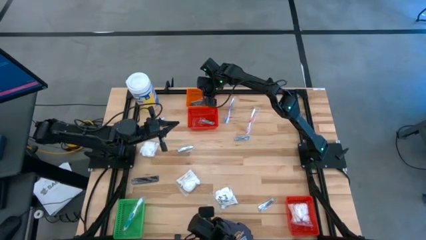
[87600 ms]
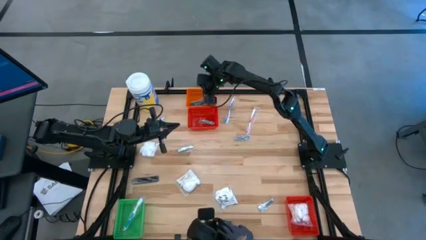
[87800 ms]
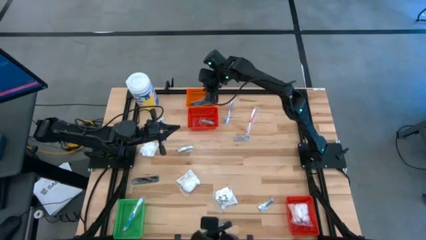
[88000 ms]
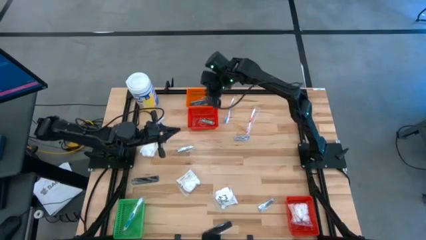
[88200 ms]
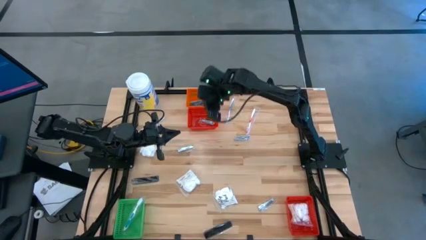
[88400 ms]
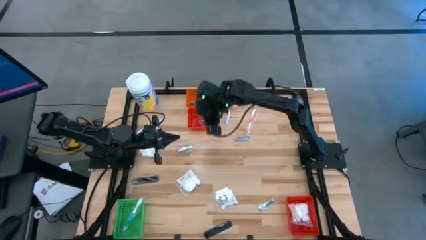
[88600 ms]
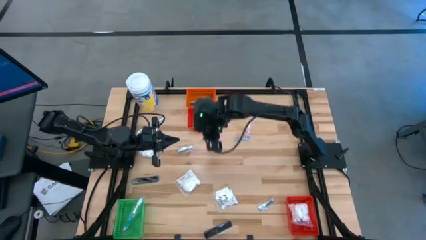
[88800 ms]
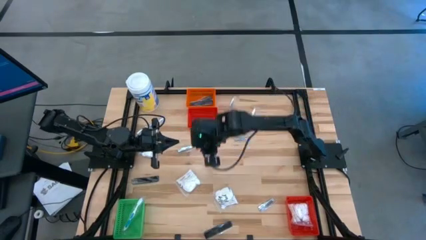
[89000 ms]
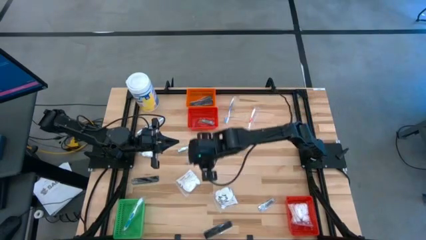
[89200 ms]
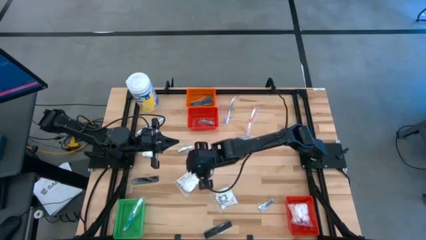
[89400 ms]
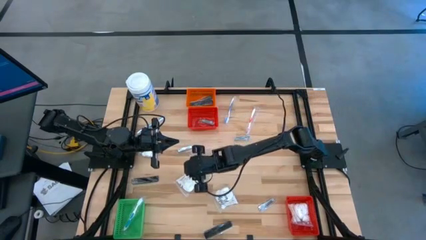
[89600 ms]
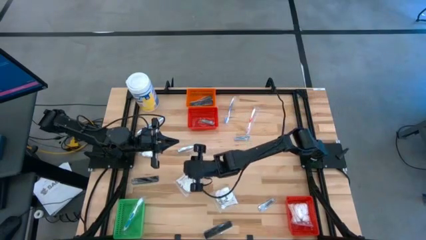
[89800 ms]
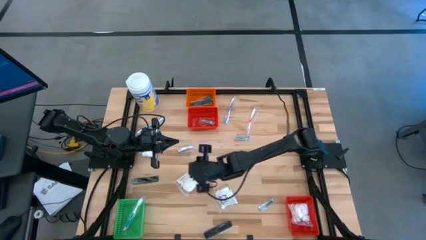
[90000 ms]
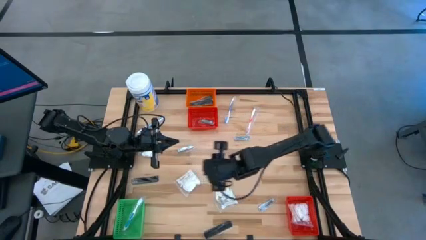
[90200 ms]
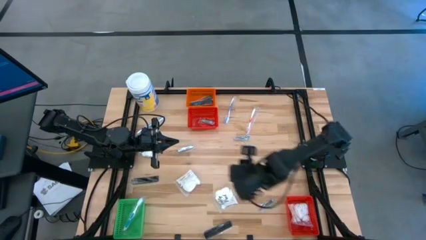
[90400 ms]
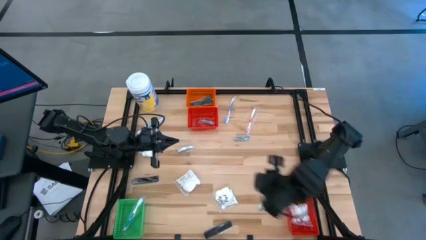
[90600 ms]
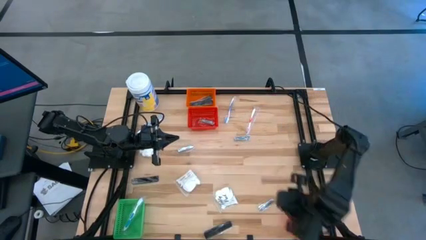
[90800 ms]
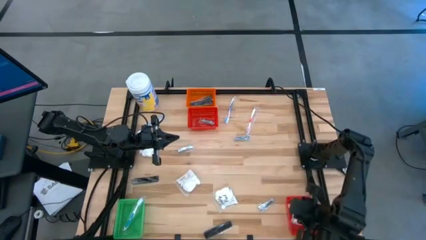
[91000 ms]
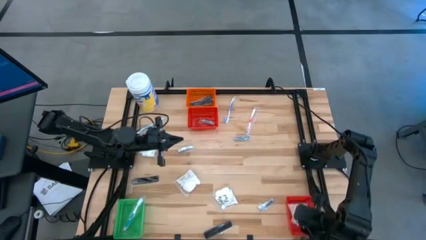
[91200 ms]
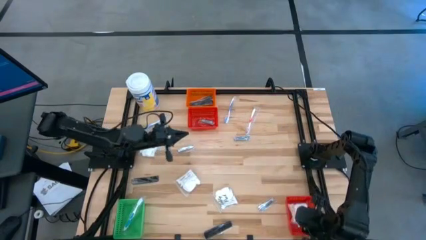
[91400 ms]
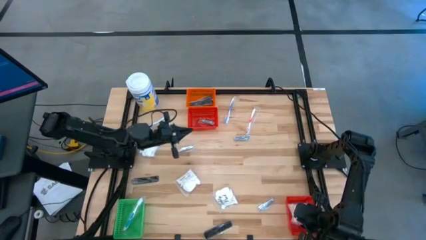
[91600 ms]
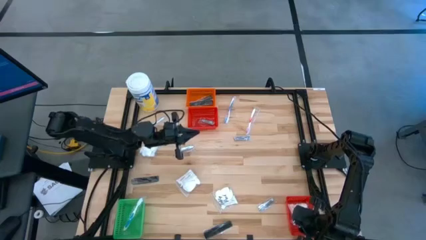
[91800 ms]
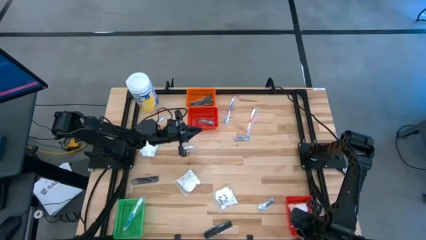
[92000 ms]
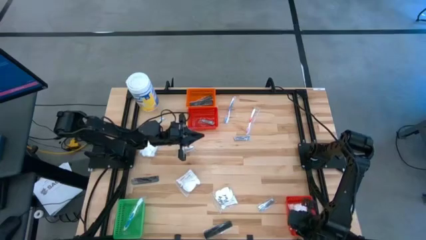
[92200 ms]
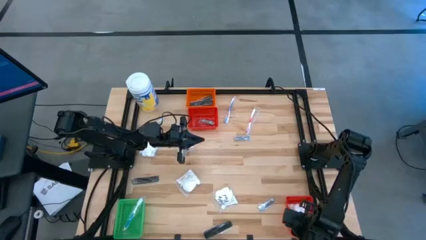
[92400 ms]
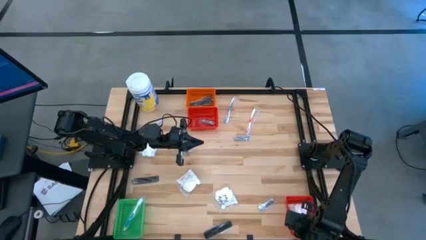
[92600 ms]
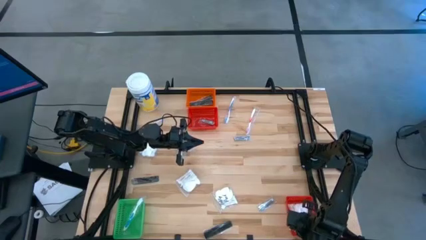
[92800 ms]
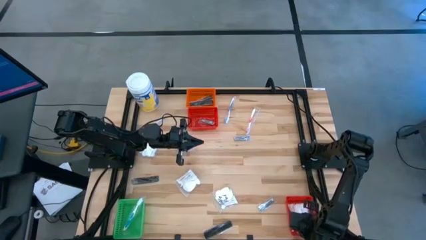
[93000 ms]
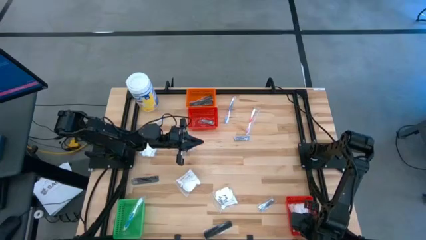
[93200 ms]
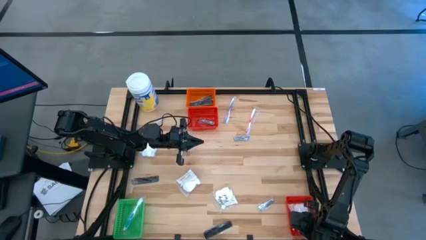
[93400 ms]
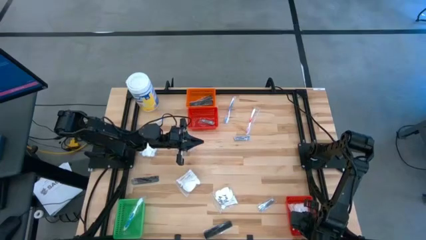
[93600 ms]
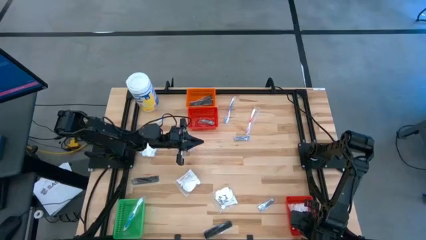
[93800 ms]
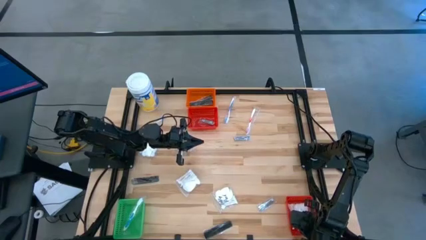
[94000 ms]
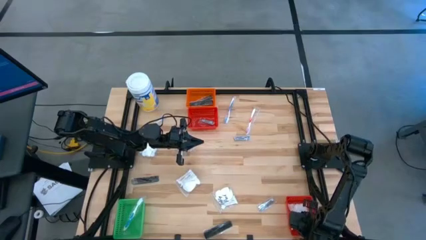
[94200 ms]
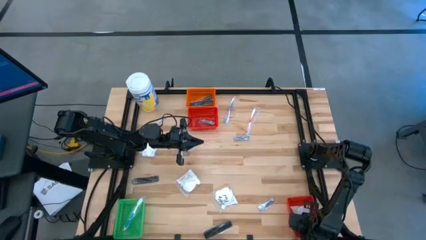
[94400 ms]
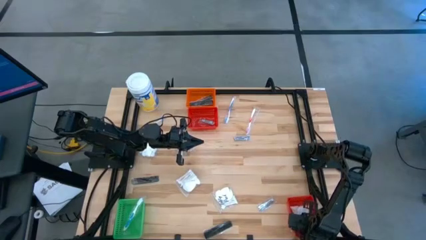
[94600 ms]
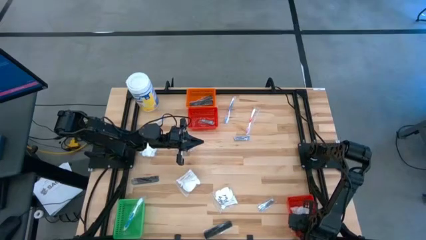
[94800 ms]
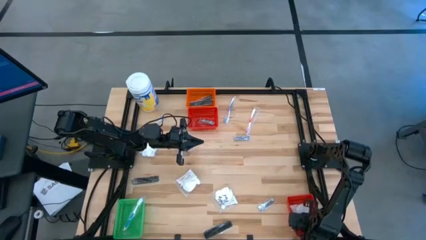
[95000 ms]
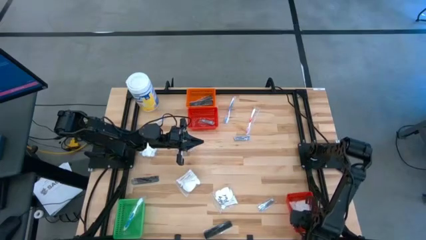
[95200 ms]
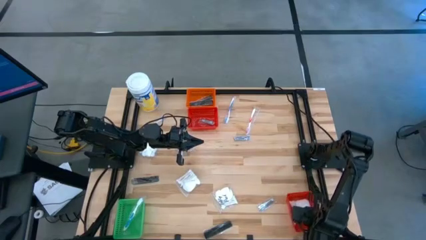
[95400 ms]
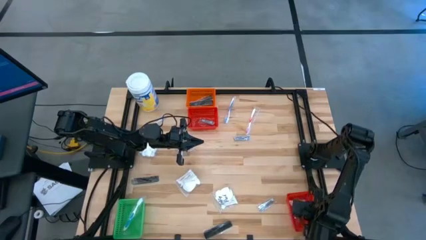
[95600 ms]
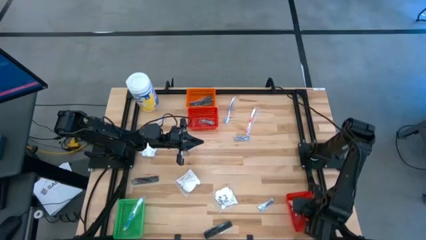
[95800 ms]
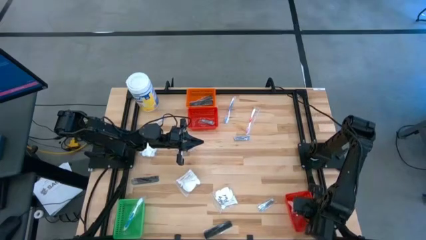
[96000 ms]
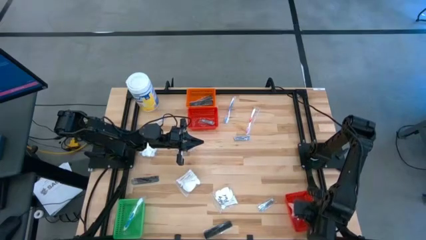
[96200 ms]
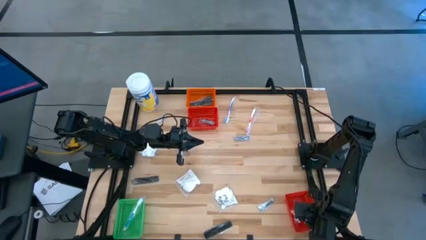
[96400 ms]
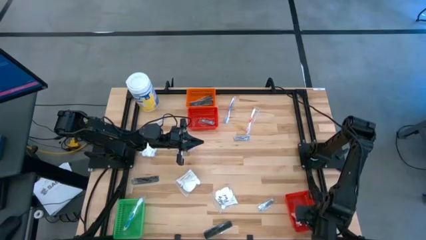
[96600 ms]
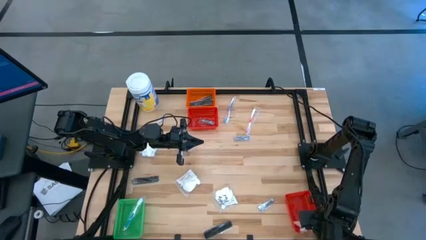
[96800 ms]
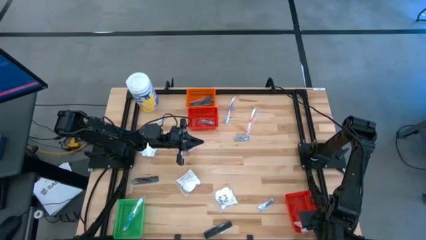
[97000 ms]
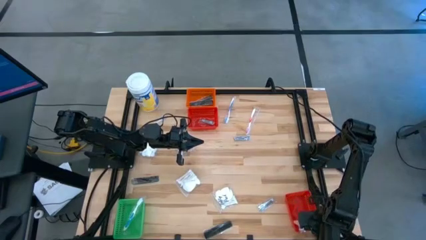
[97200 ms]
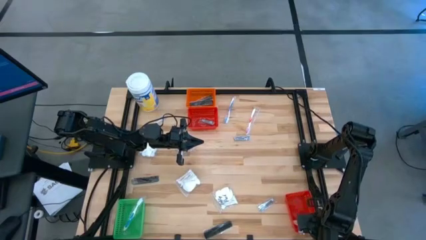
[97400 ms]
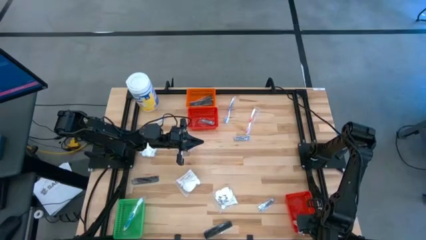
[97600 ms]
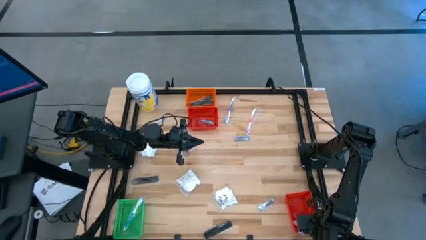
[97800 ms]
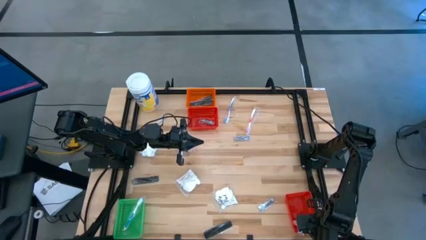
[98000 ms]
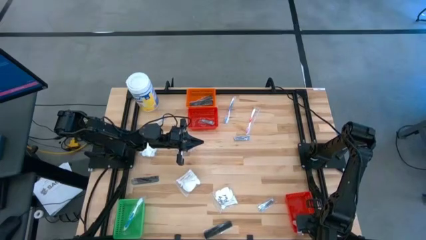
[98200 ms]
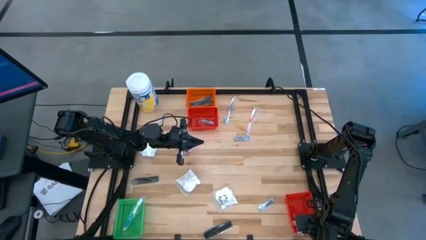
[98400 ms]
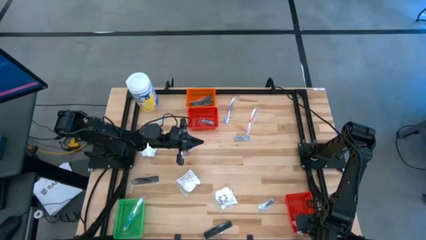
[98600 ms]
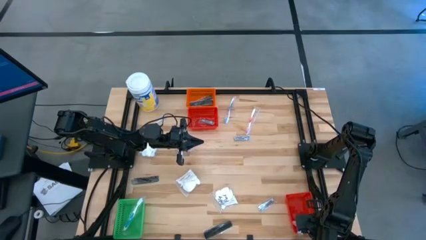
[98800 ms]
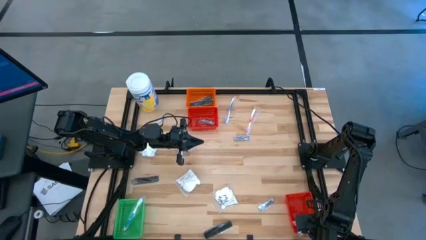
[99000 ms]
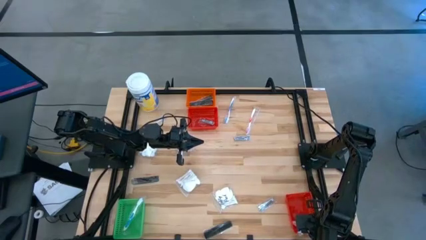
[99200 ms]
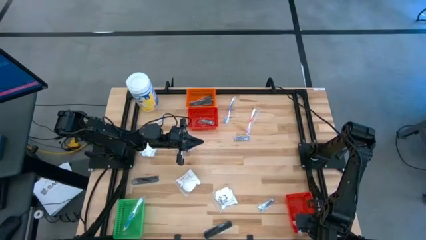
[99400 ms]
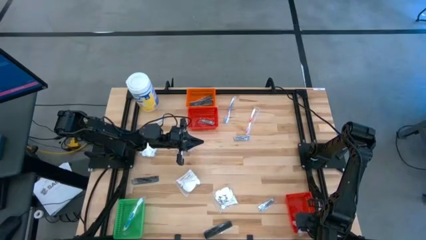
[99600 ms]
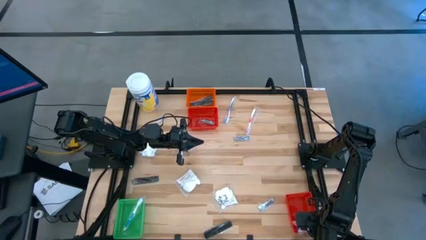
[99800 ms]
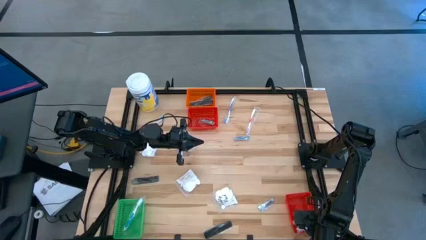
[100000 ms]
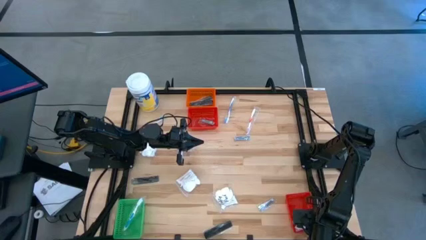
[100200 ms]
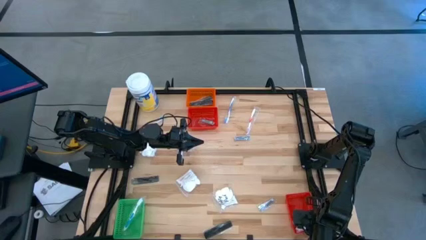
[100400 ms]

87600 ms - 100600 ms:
Task: Pick & Place Travel size toiletries
Adjust the cotton pack in the bottom red basket

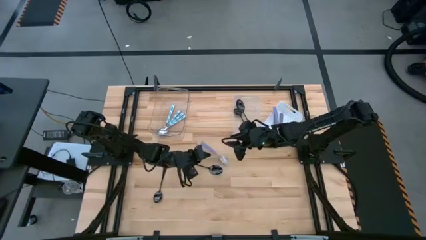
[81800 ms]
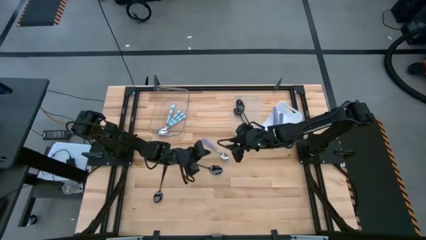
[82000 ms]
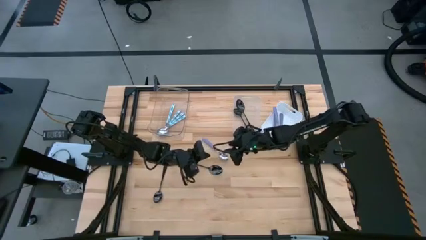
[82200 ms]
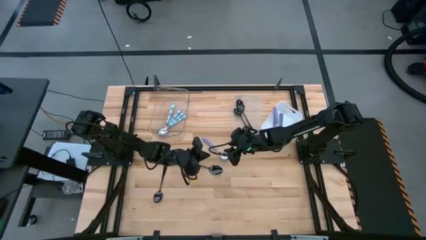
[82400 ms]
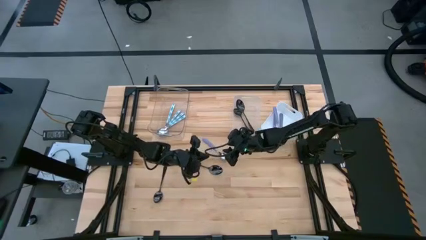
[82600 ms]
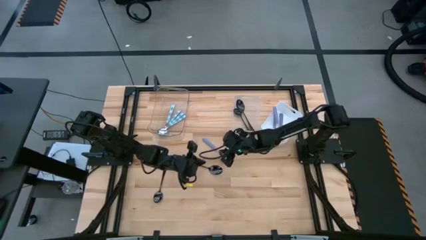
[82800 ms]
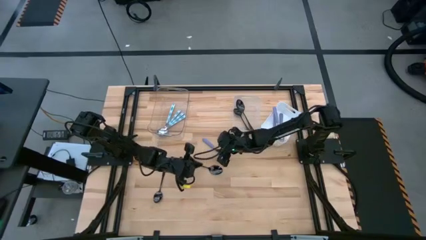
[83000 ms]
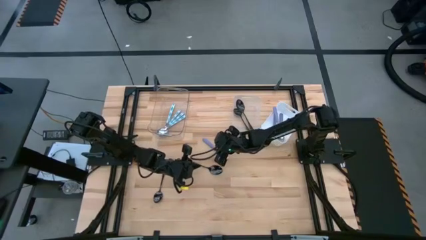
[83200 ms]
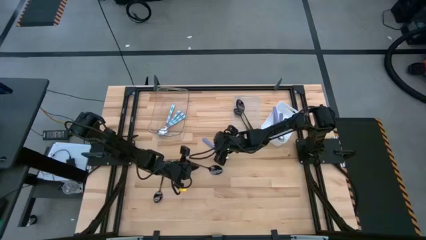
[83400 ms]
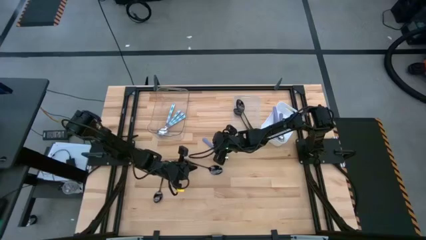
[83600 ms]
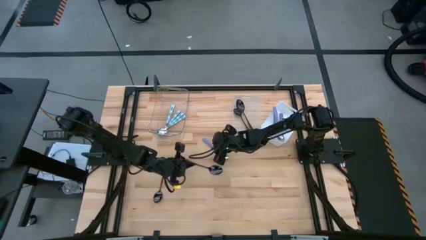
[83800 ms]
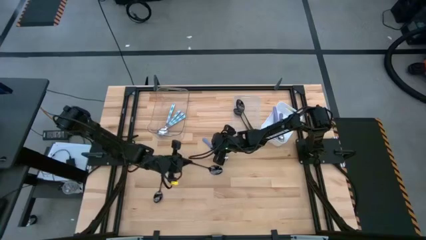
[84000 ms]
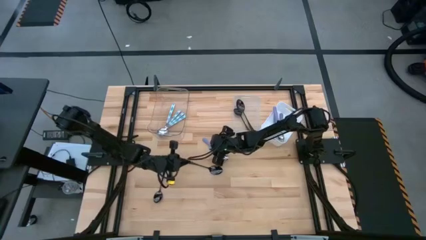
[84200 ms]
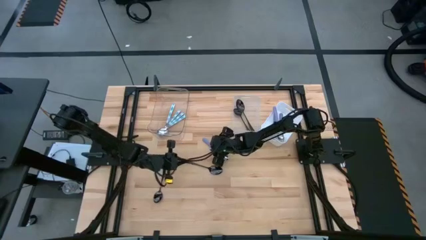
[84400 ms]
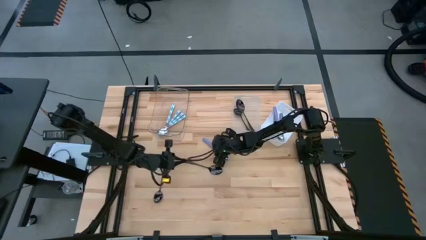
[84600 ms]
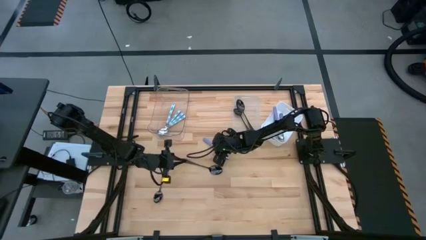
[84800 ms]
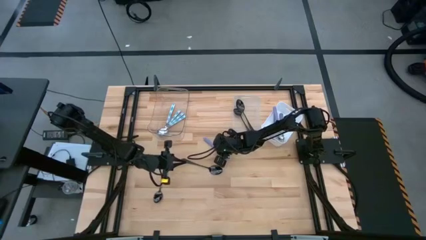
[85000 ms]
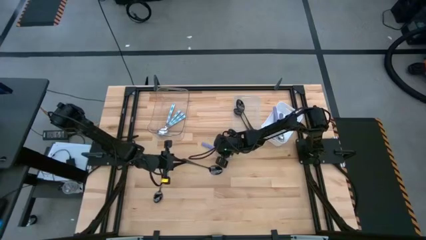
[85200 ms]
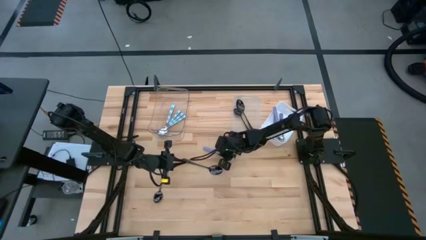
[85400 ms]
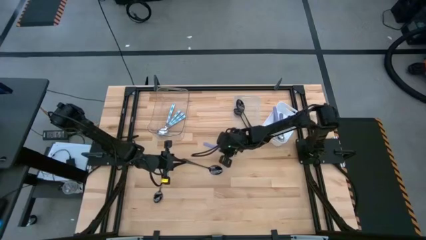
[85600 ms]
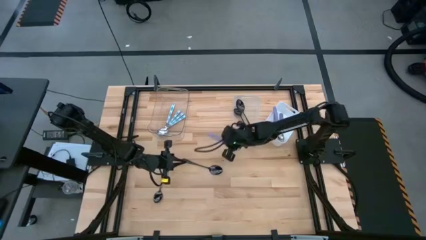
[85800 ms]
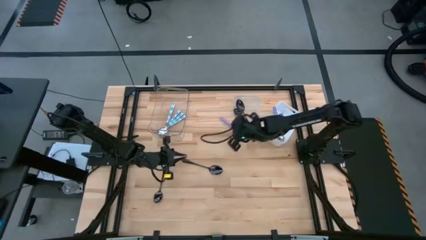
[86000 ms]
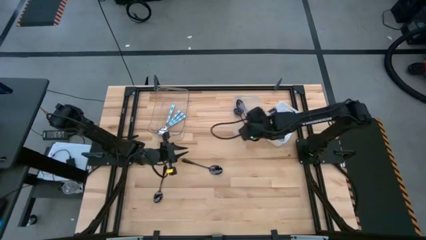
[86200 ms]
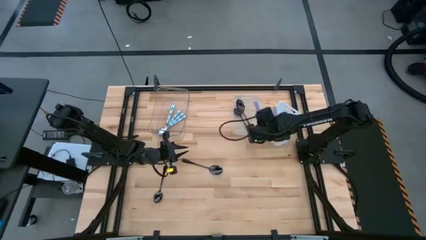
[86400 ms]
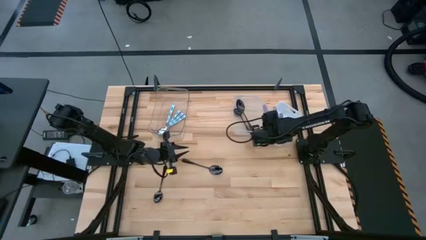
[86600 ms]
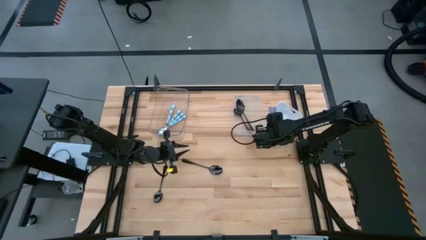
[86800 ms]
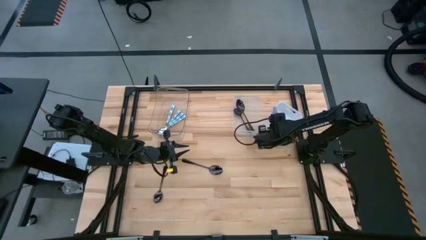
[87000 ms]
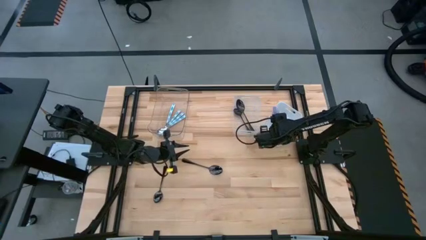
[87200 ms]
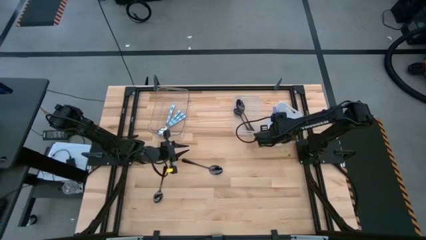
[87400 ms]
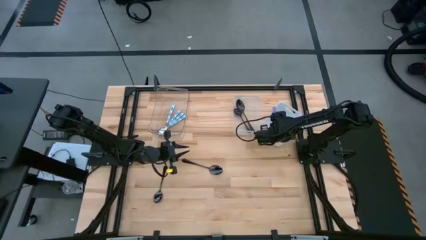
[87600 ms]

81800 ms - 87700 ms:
Task: Sort silverware by color (type)
Put the purple spoon into the white bin
